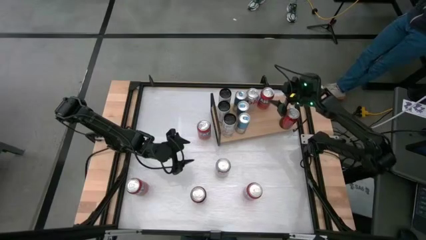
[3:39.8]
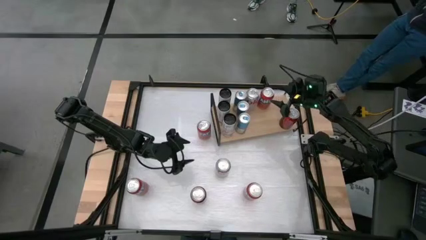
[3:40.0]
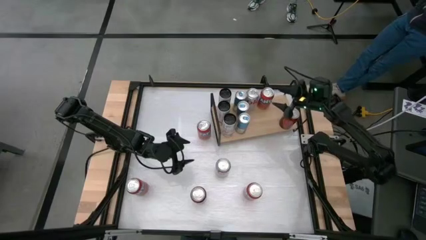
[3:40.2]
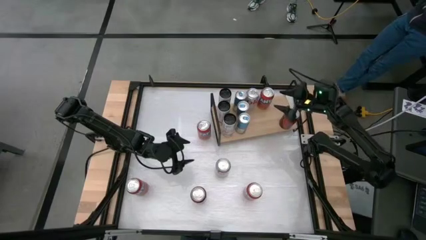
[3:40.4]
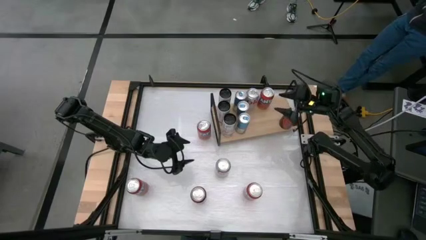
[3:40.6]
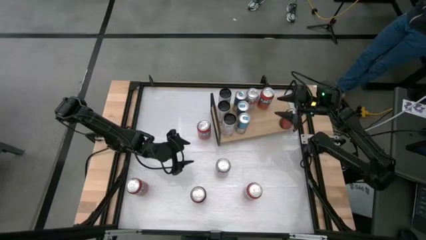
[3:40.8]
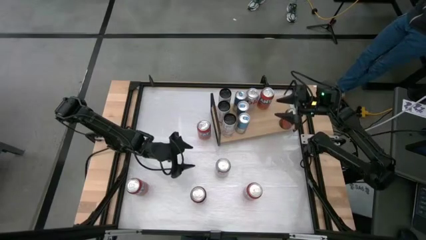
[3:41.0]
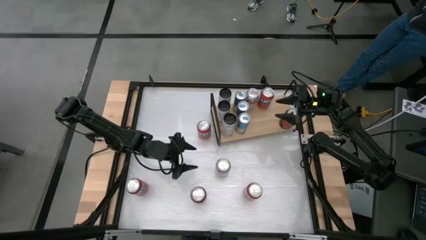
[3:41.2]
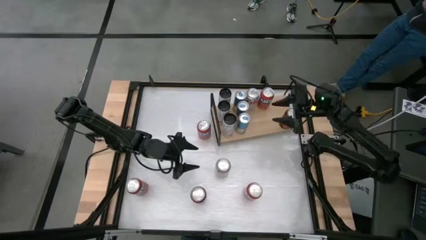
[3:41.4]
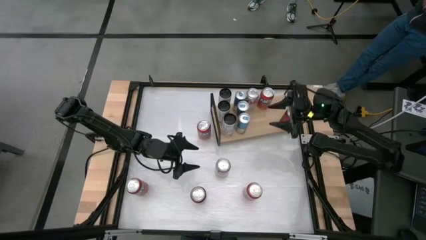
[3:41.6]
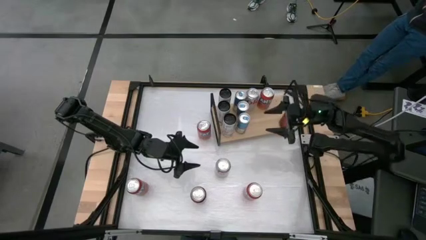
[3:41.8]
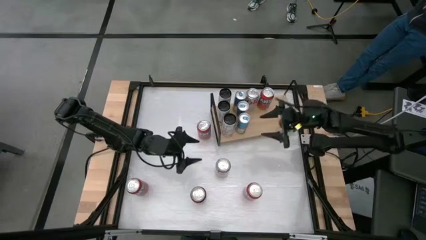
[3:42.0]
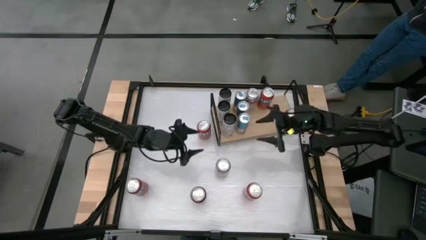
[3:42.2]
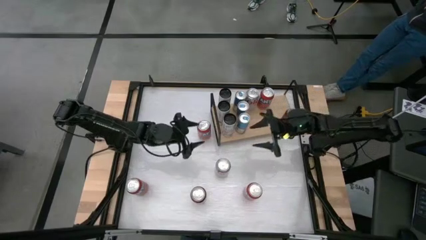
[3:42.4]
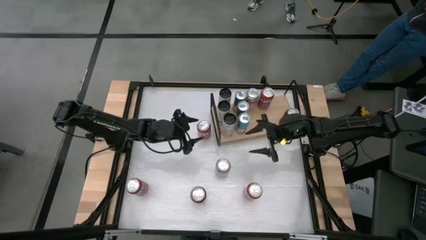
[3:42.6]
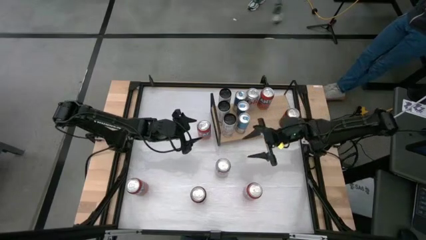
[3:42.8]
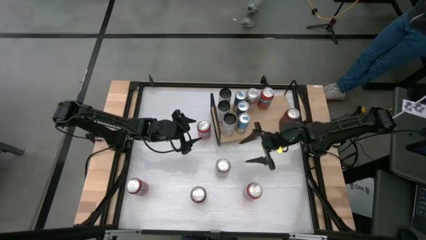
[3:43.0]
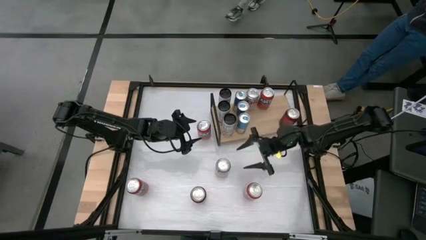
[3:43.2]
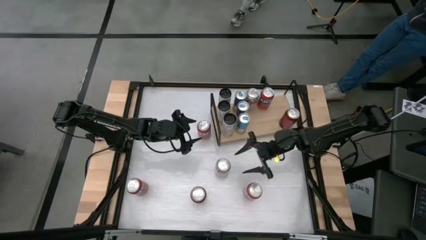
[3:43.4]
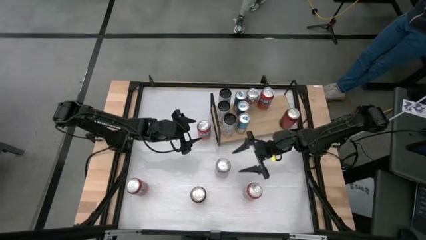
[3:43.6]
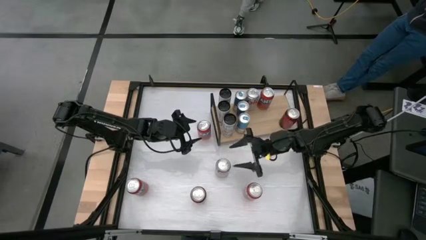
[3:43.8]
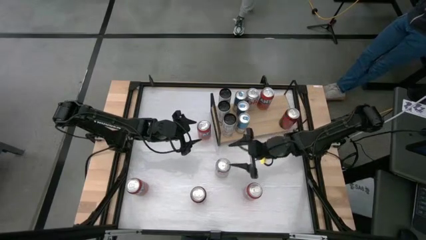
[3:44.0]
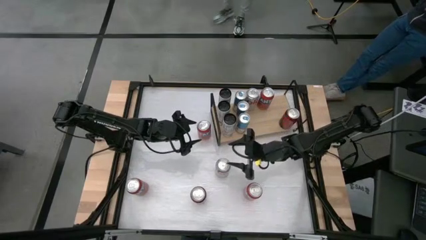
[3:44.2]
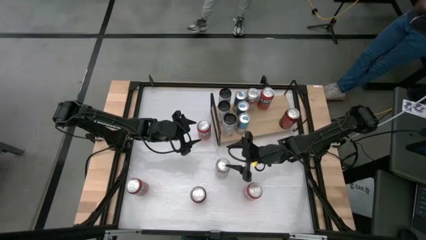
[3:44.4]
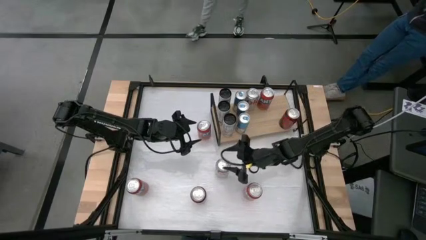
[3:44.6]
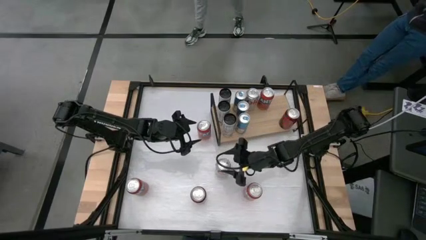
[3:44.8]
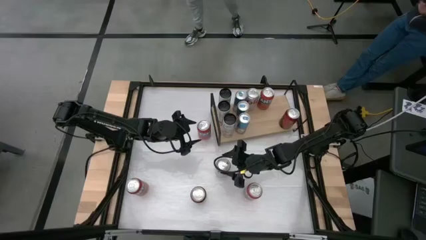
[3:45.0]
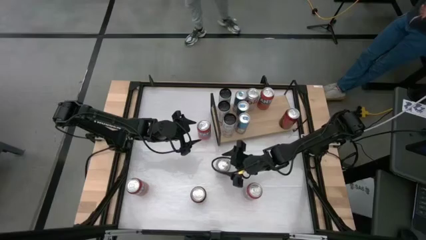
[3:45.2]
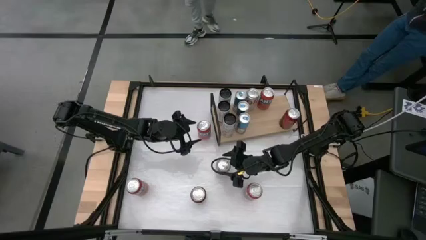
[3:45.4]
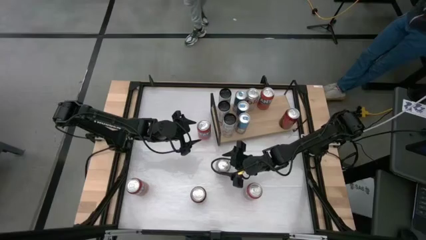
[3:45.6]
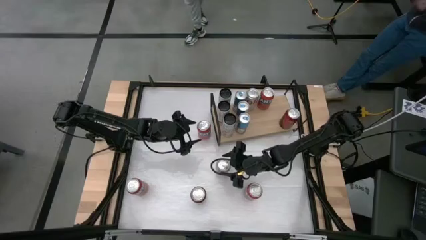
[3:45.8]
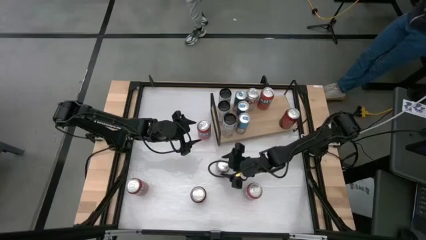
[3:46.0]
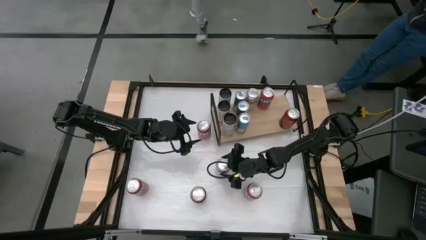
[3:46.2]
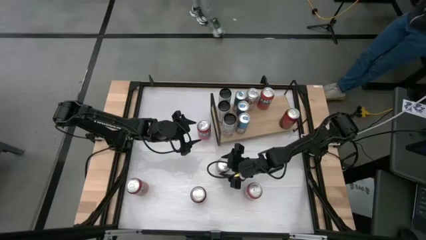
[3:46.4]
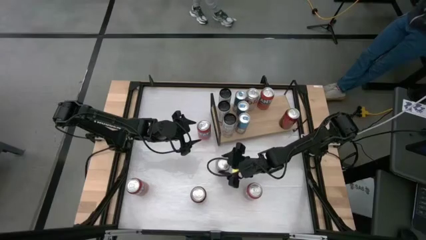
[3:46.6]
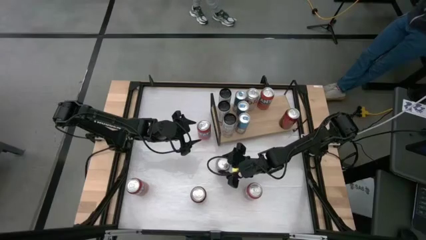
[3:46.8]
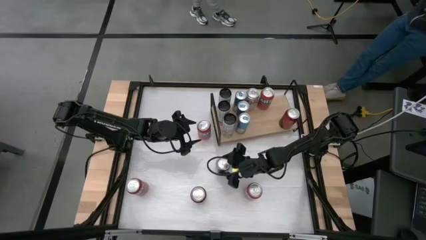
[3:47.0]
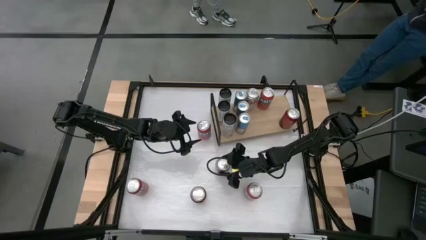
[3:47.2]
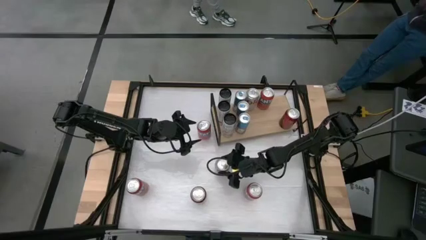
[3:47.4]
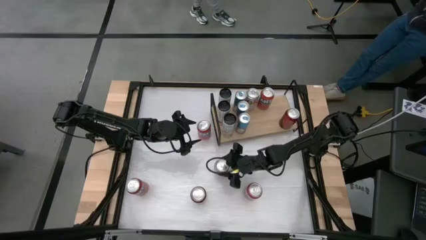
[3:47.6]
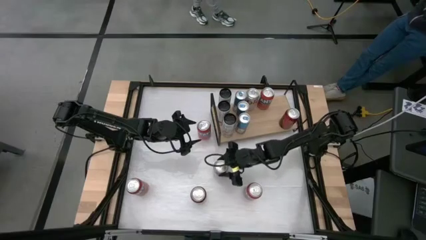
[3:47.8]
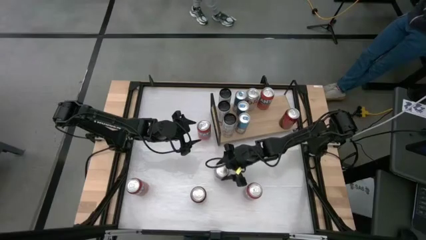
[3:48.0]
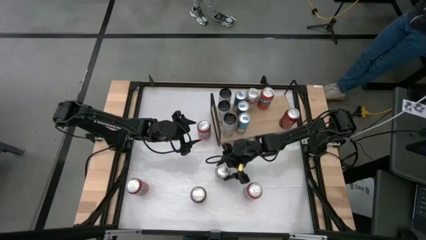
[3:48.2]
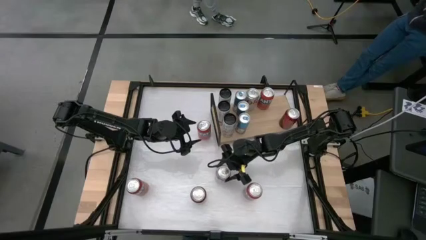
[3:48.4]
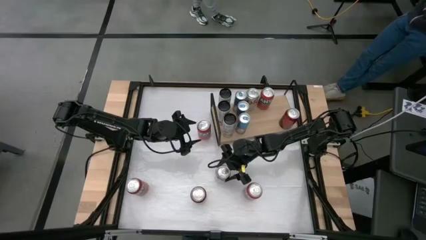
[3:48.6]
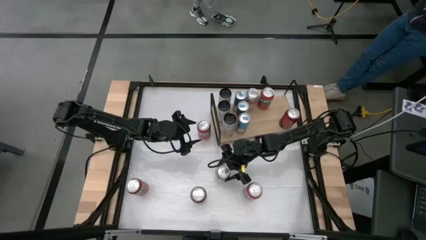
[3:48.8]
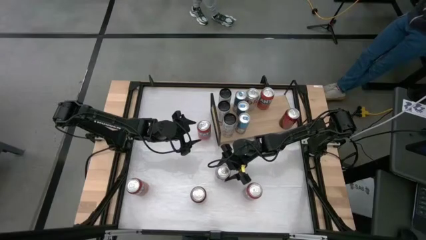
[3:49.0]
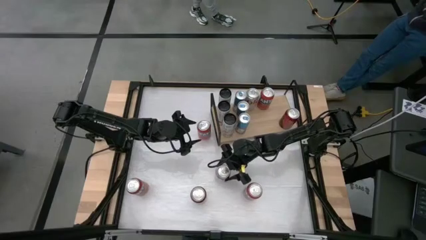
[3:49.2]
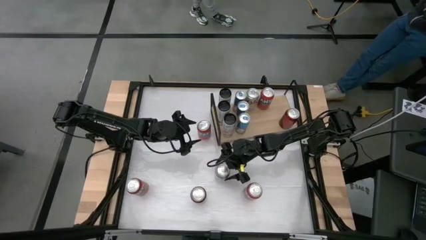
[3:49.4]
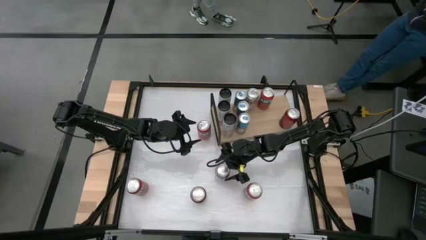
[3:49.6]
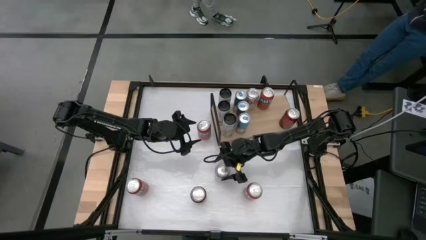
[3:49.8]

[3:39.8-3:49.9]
Task: Place canned beverage on shelf
Put the silver soda can on the shelf aligned with the other silver soda can

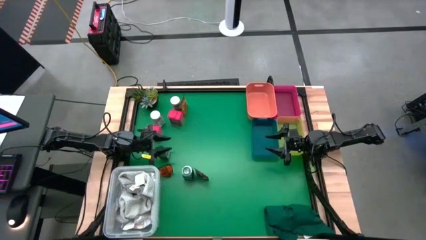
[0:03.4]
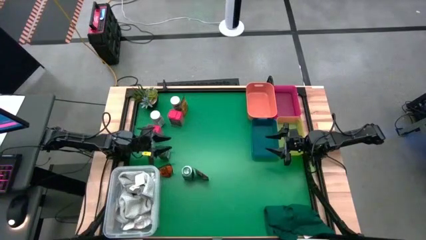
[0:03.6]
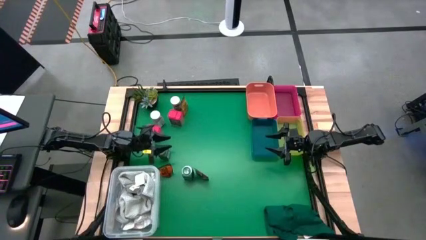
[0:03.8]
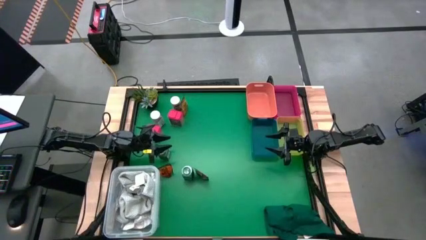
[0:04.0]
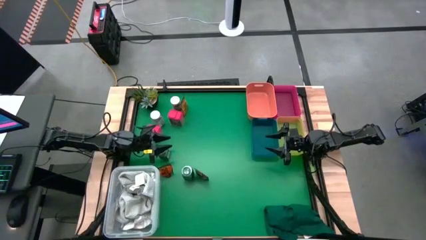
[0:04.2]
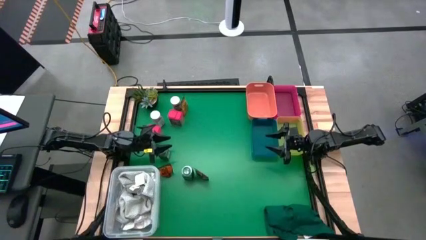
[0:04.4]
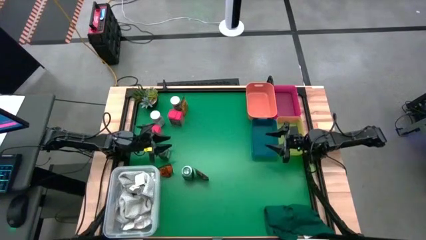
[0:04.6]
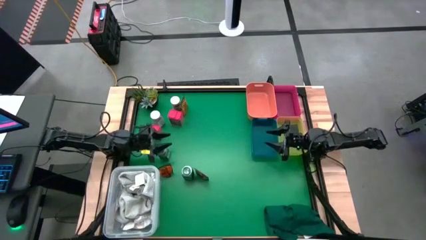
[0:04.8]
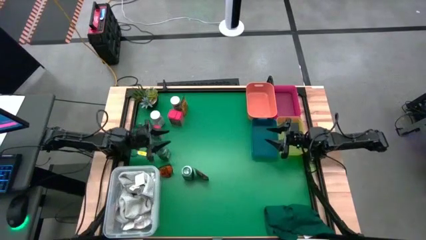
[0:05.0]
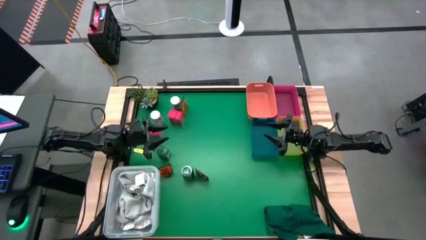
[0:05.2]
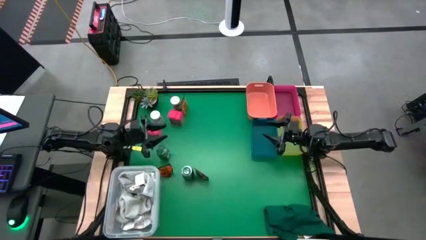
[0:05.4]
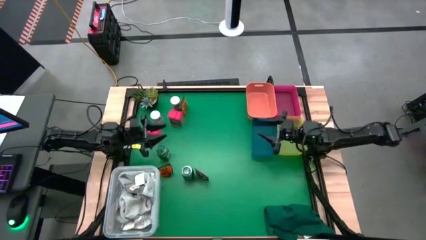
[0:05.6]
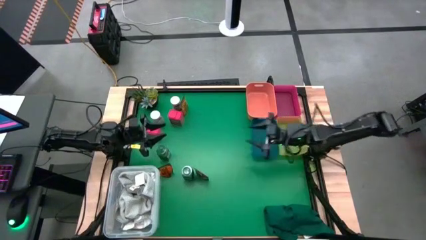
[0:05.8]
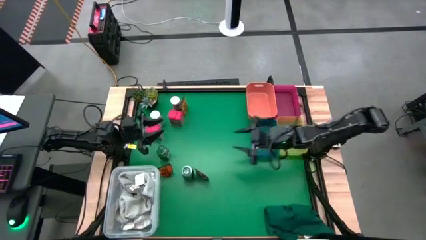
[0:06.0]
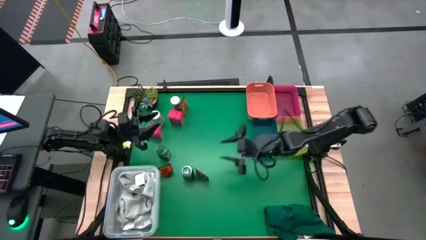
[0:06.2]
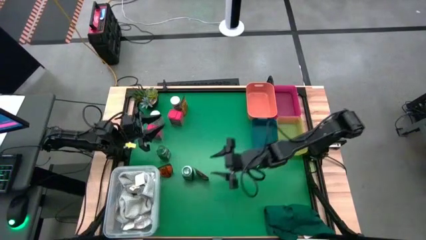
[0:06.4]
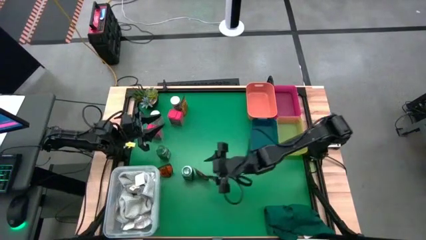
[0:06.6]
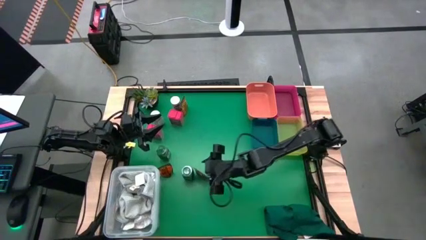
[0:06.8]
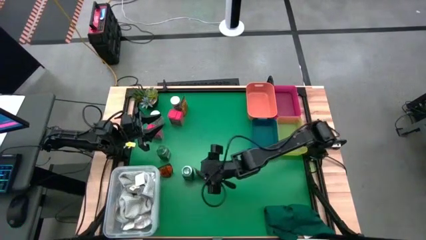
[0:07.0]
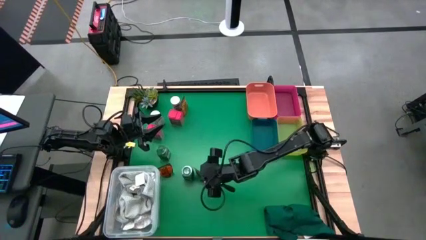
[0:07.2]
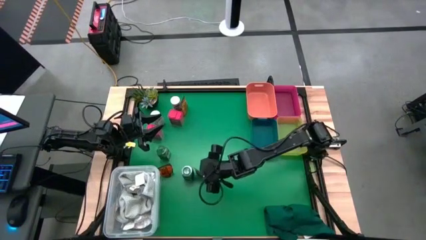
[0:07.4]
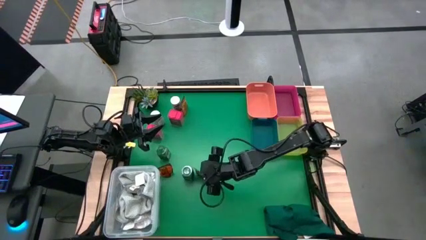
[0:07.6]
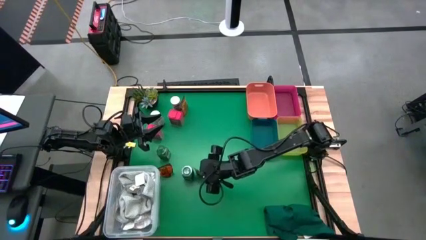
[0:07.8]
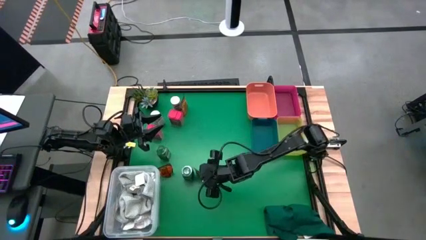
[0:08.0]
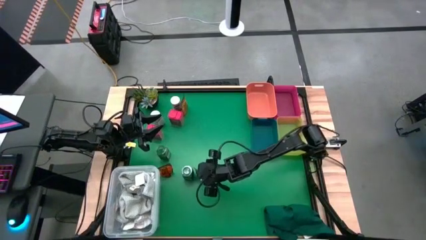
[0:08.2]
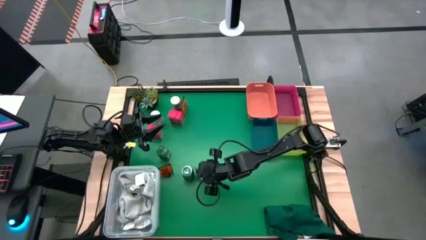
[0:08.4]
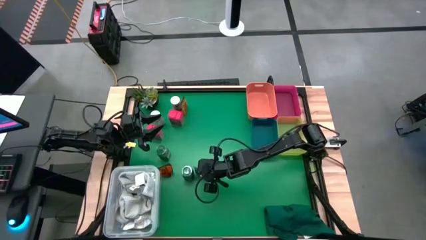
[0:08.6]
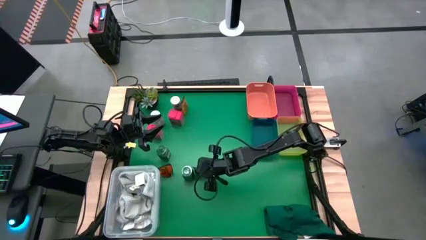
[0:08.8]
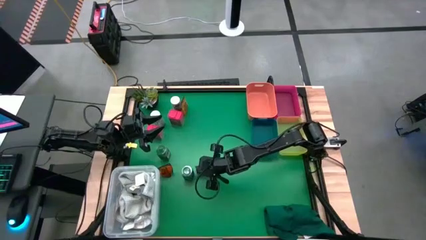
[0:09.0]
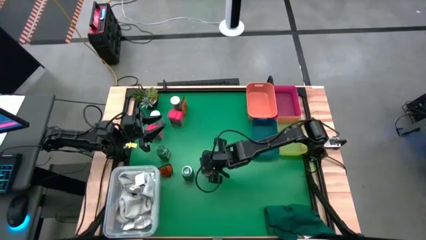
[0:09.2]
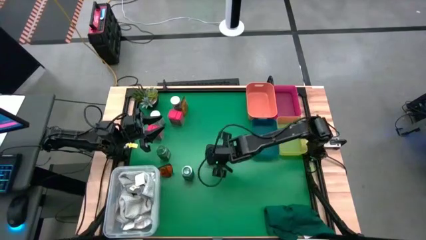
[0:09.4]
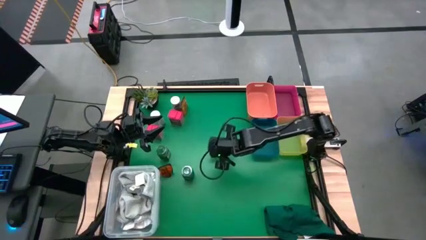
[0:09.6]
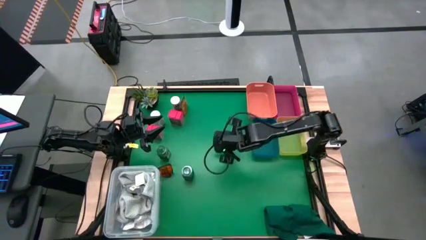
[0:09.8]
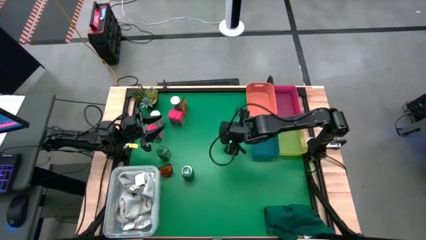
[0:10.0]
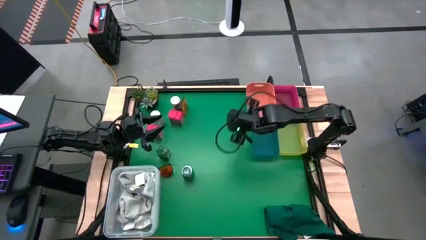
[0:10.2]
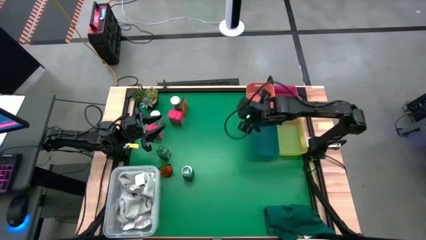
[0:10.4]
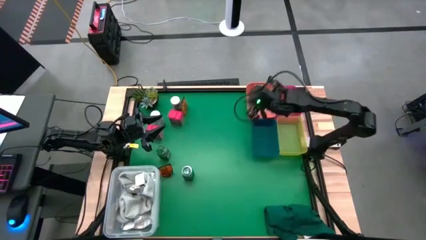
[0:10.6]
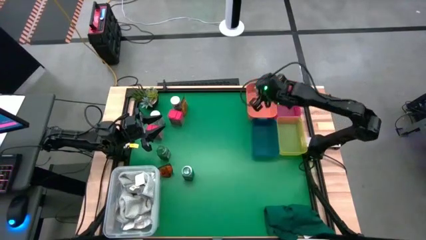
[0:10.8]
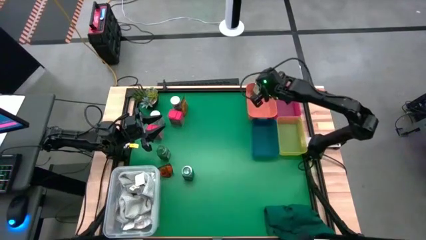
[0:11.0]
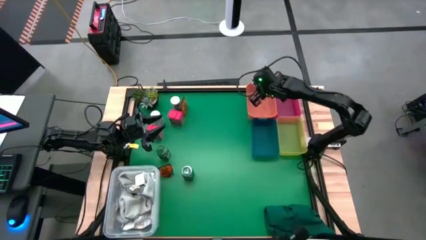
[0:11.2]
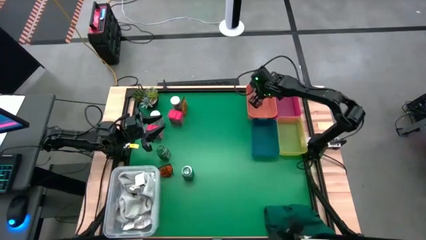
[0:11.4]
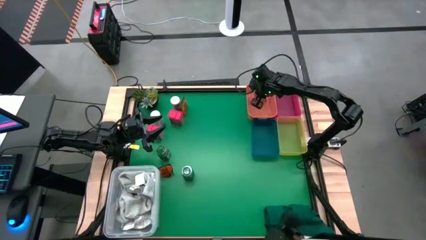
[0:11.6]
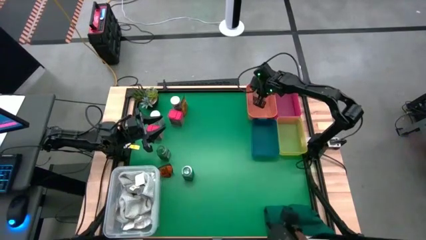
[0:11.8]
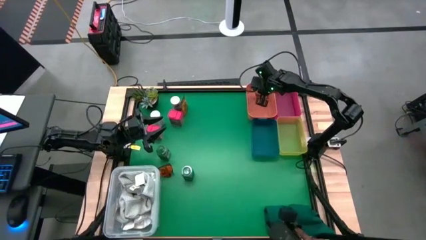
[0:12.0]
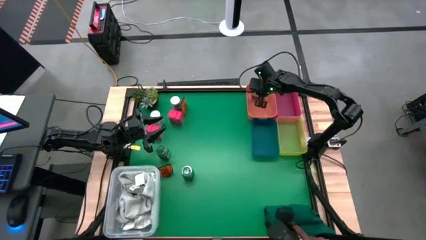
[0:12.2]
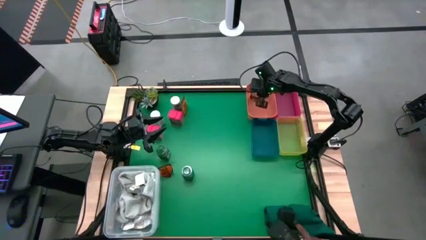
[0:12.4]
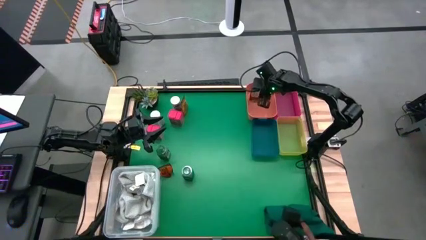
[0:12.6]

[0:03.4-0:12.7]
Task: Sort spices by type
Put the bottom right brown seasoning pack into the orange bin
